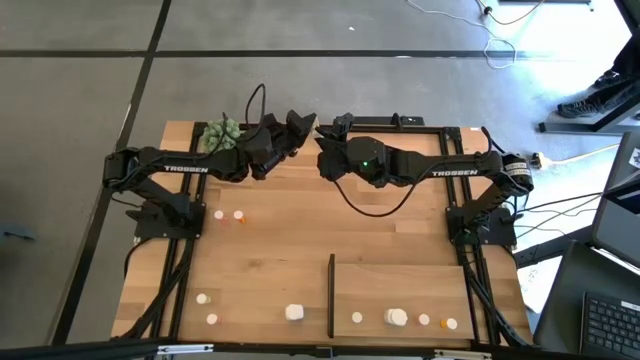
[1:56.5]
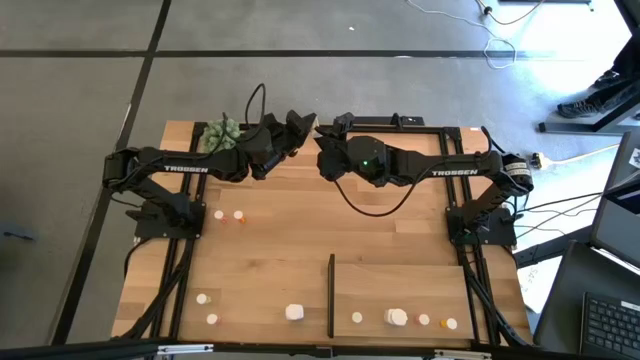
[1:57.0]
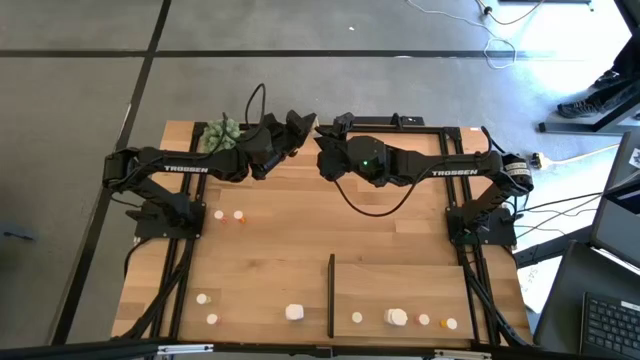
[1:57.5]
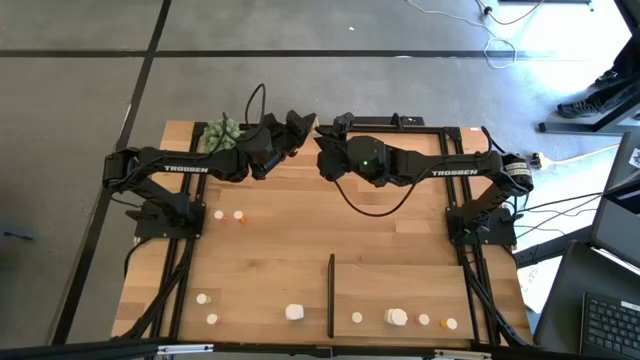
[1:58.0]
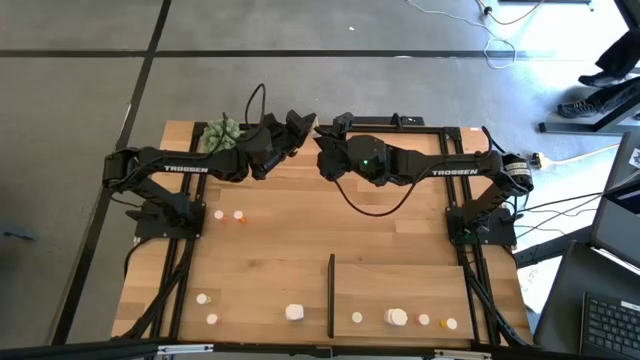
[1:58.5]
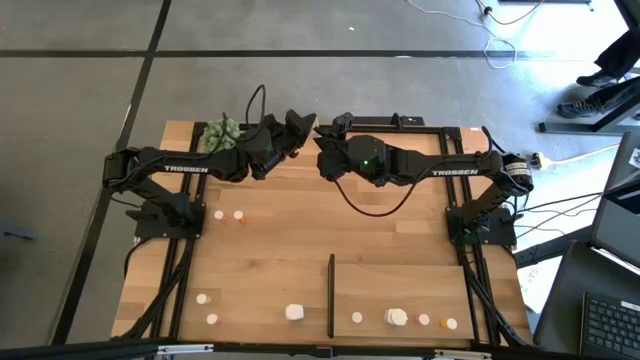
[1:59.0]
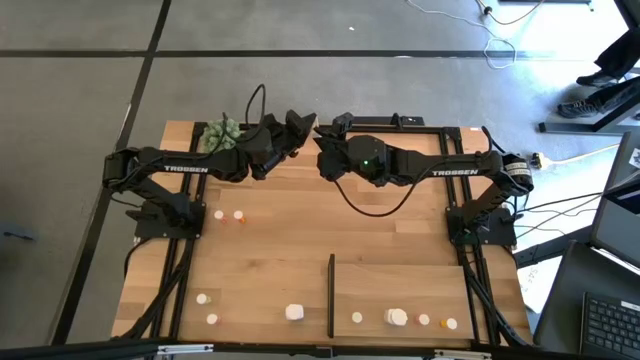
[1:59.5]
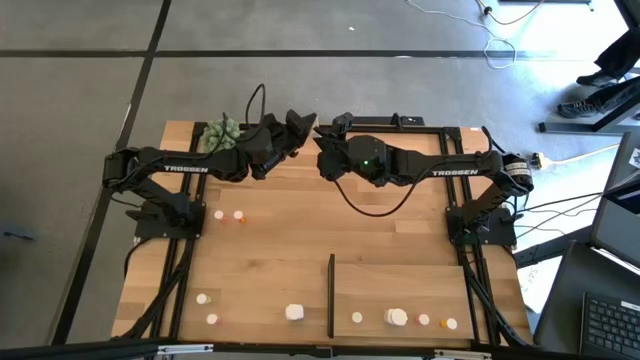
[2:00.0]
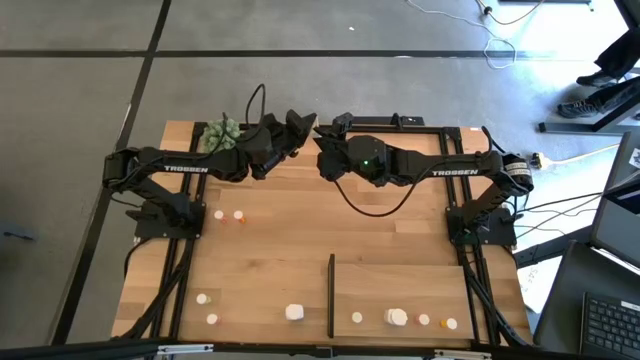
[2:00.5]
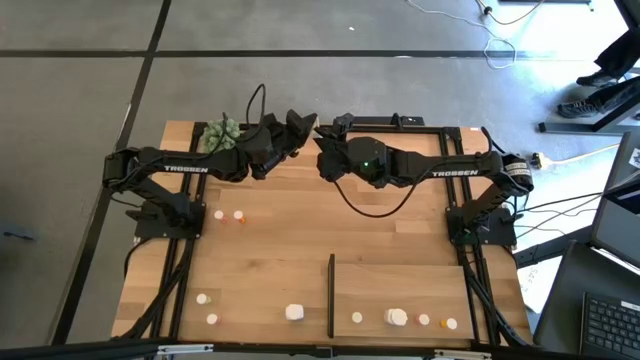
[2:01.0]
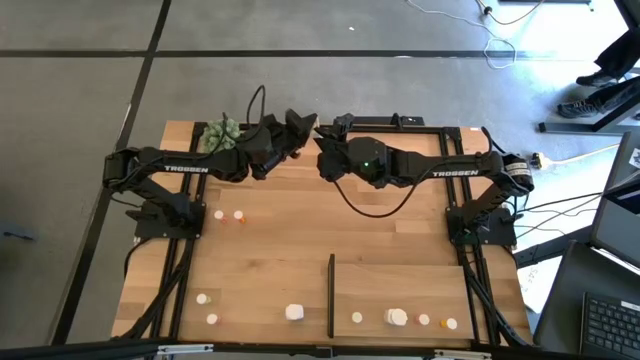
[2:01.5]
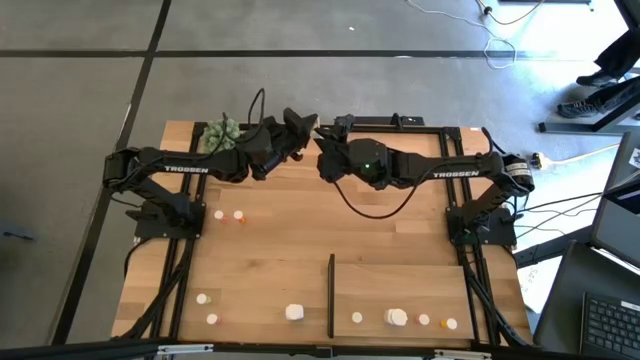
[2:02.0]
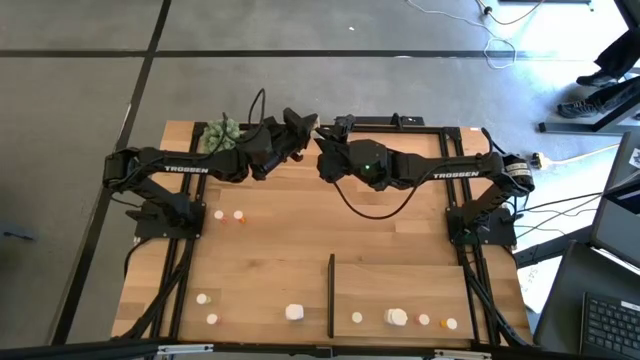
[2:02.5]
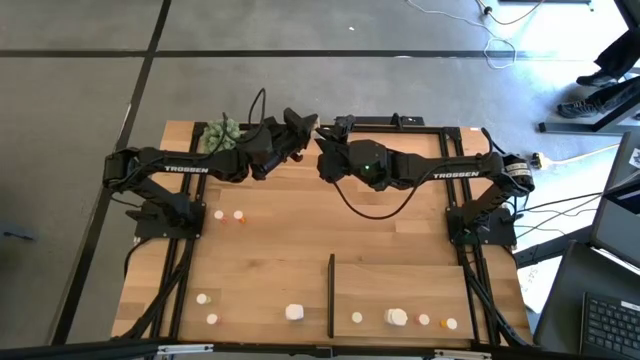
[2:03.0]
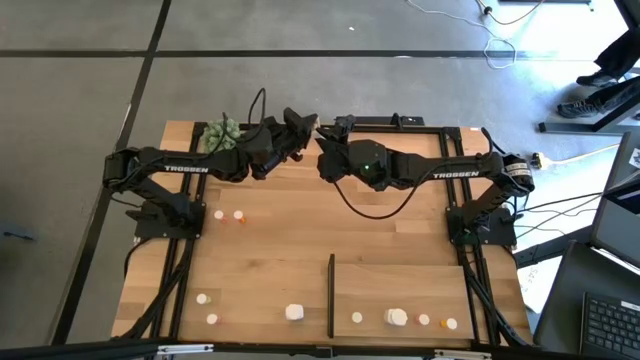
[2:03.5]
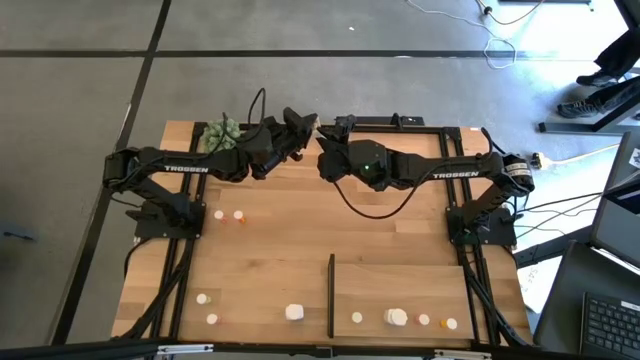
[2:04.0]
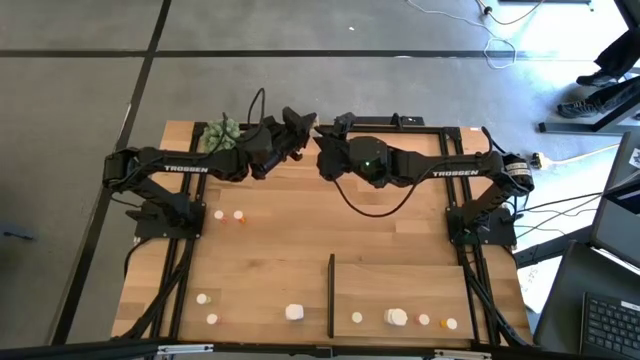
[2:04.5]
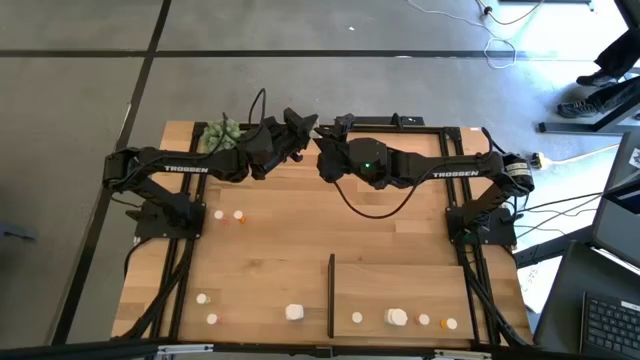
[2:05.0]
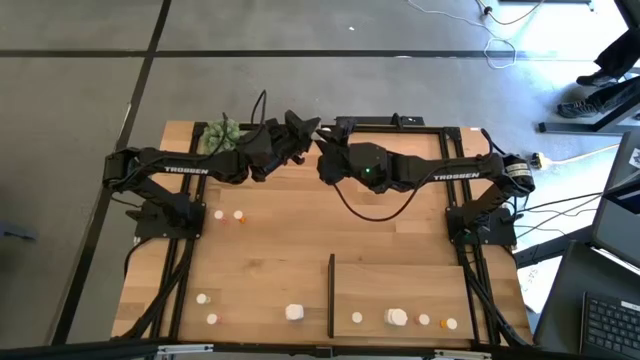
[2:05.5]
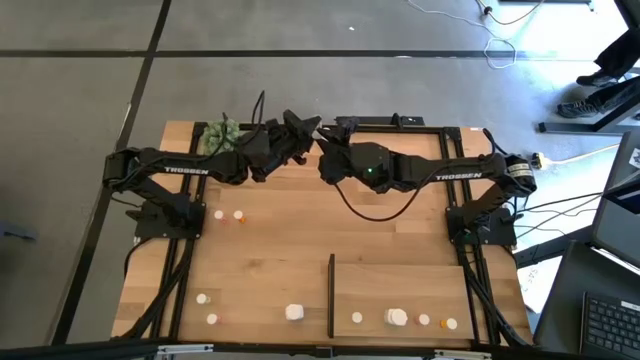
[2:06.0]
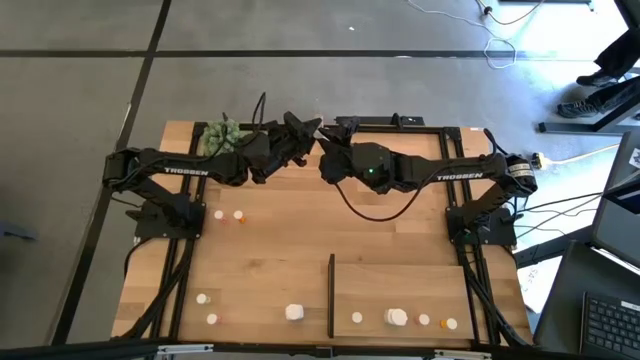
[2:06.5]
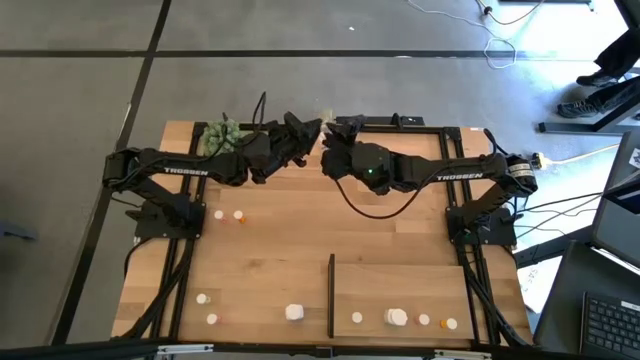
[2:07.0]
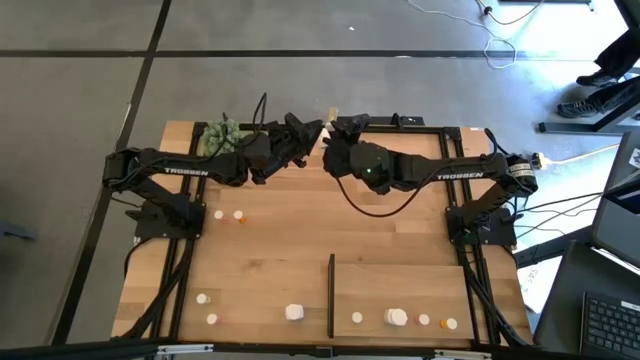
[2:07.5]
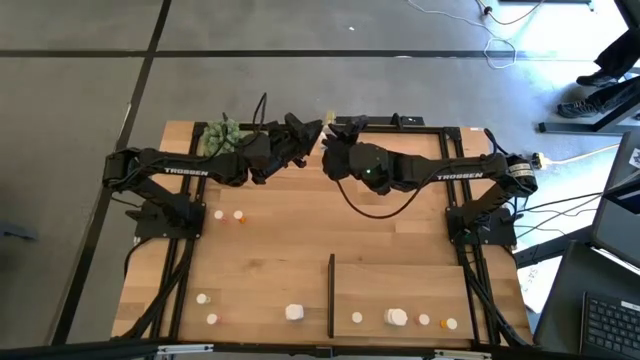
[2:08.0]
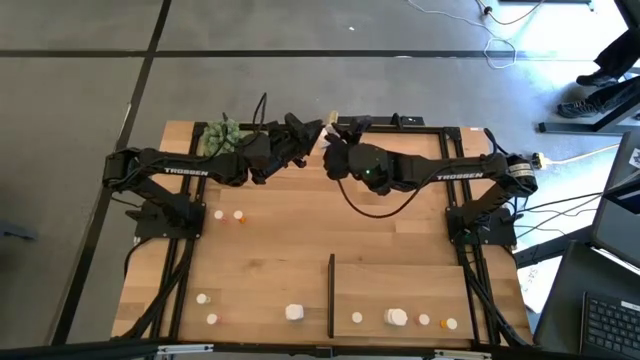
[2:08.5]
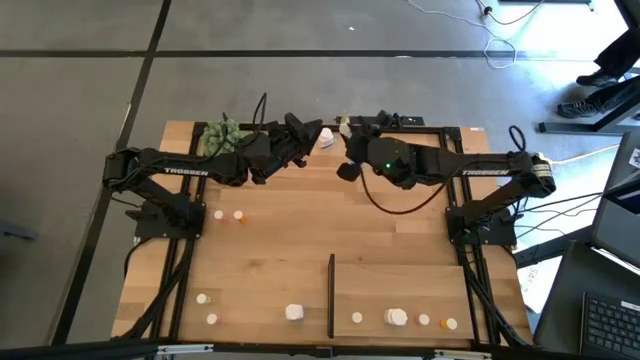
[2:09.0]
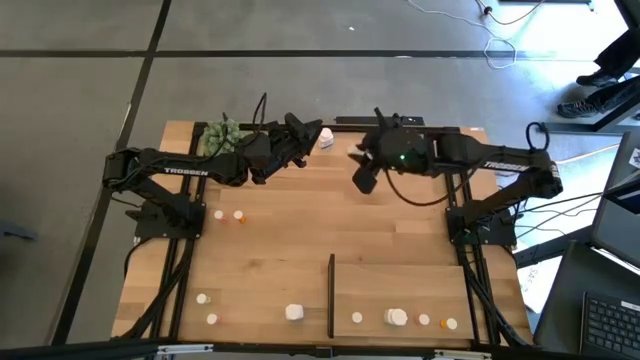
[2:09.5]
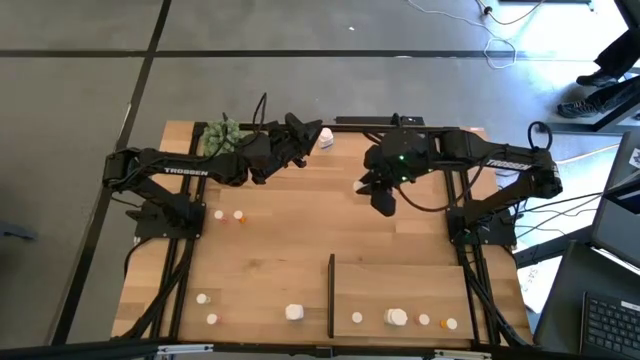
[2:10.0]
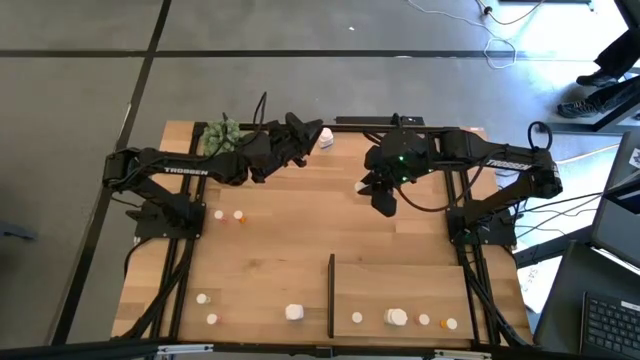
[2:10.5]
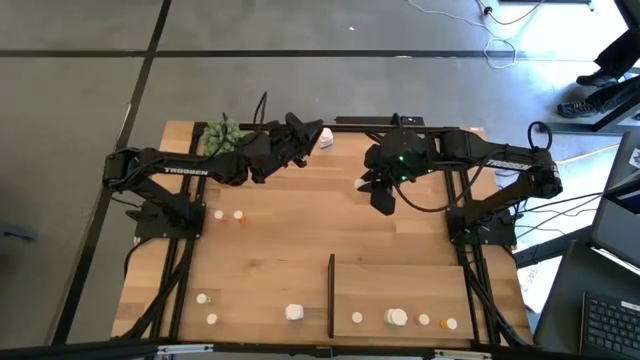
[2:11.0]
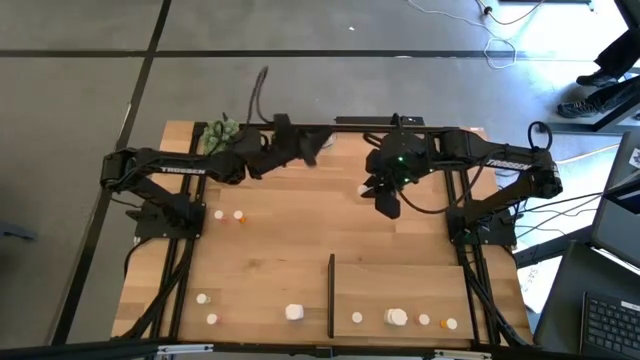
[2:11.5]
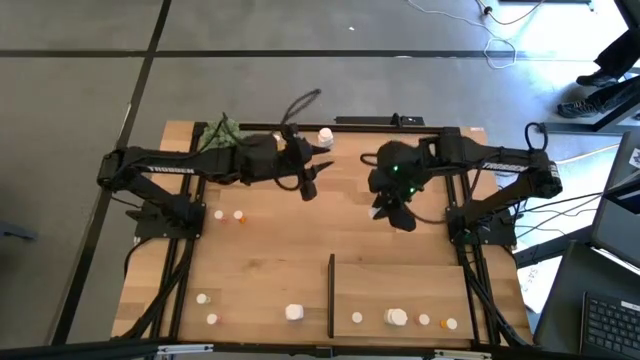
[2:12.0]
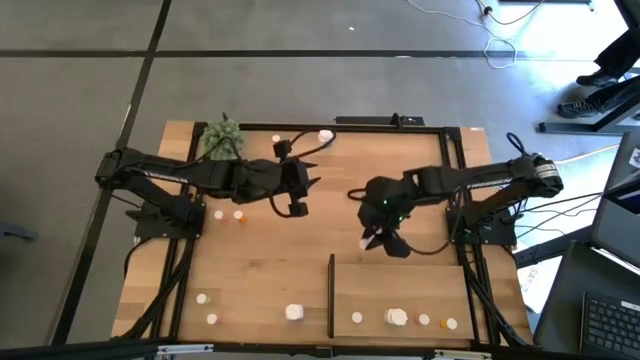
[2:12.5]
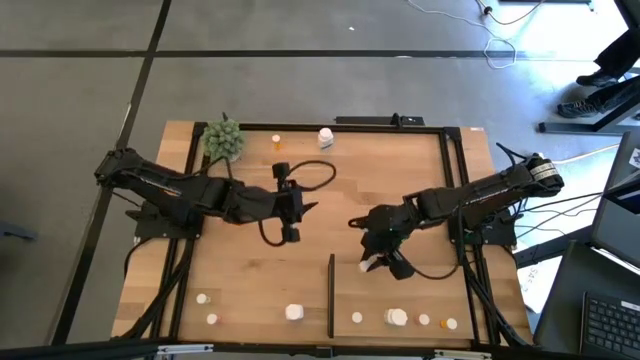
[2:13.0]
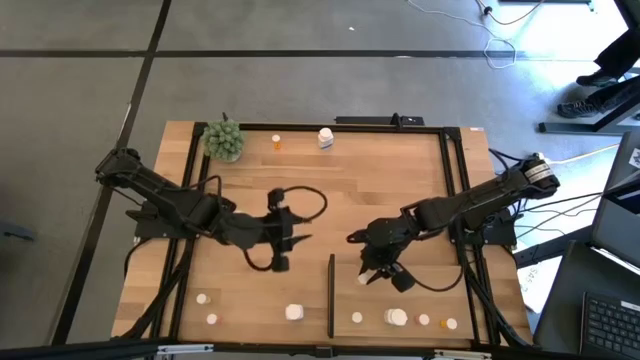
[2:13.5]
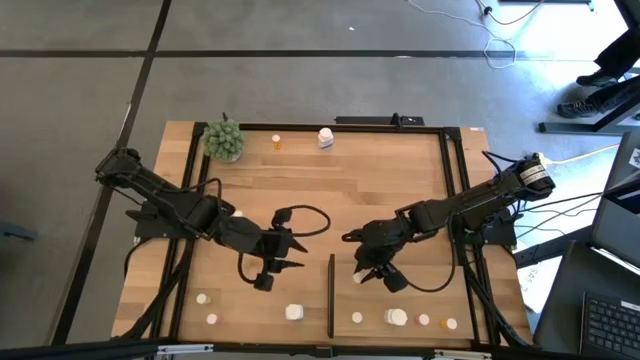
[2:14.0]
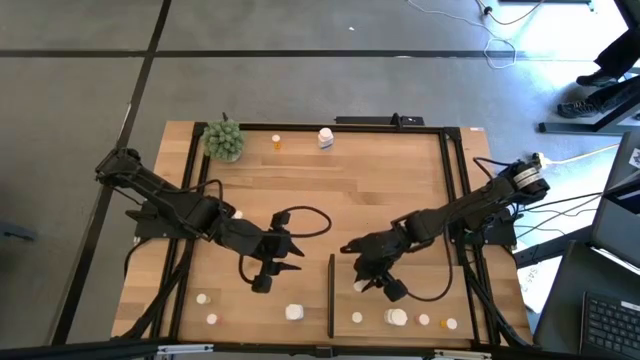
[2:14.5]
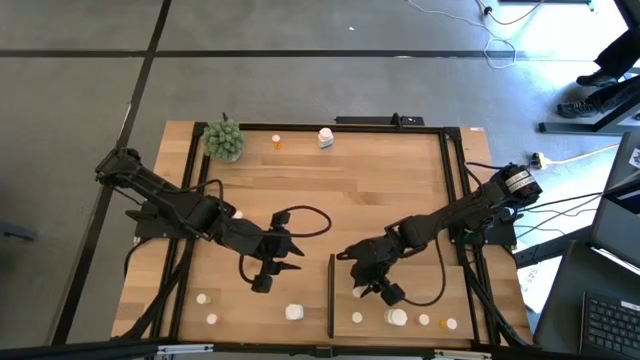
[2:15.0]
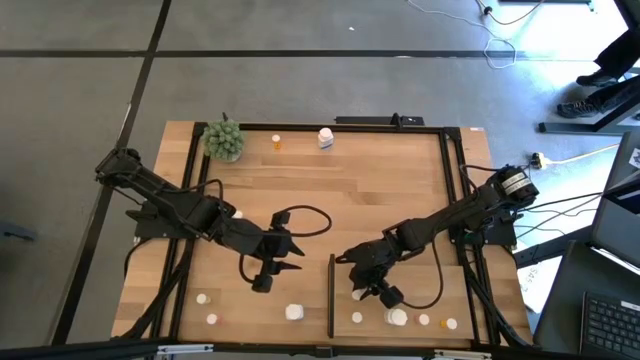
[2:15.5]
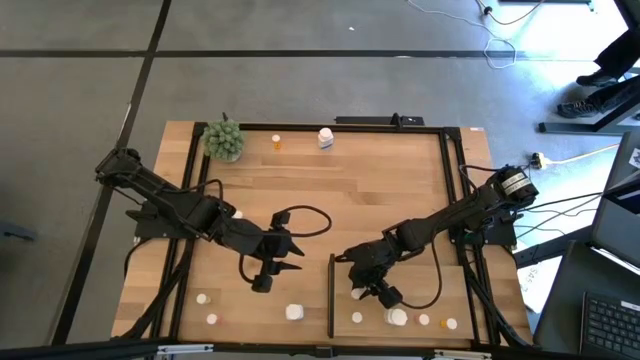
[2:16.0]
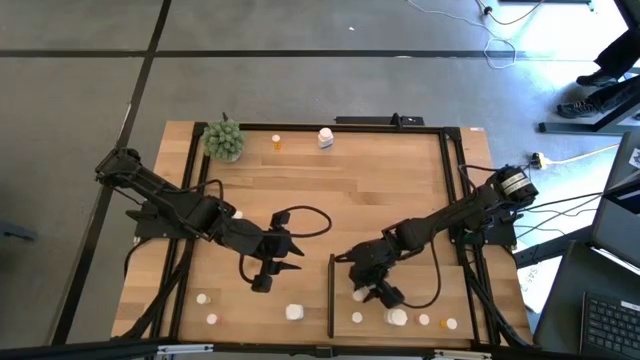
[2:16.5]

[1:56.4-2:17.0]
Task: Pick and place medicine bottles onto shelf by color
Put the top yellow pill bottle on the shelf aligned with the other yellow pill bottle

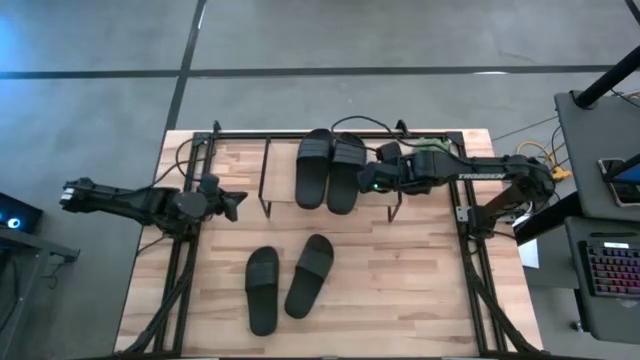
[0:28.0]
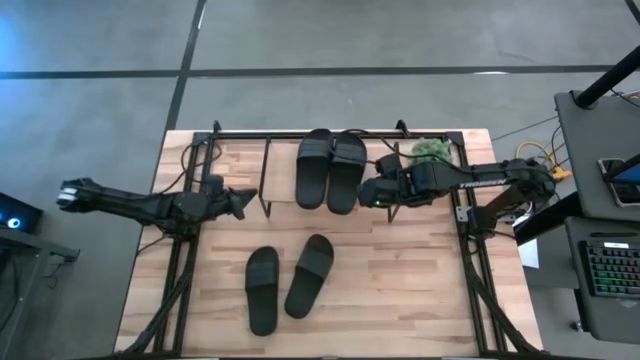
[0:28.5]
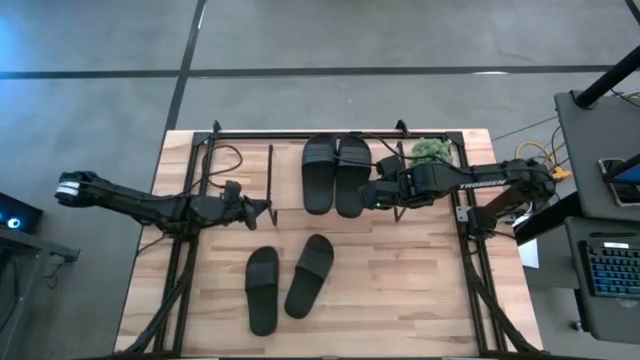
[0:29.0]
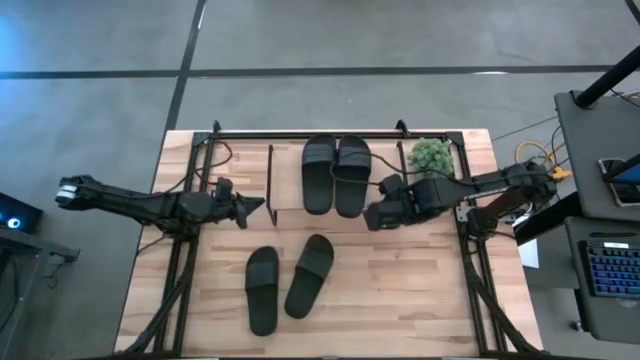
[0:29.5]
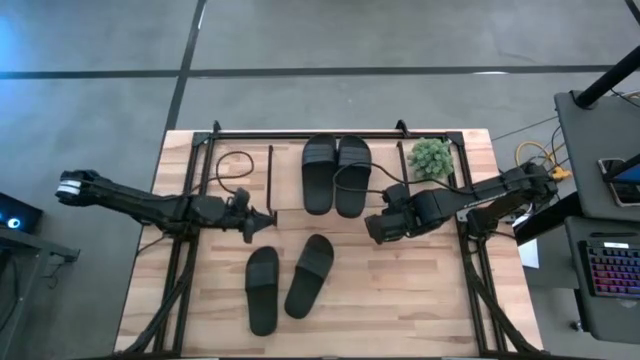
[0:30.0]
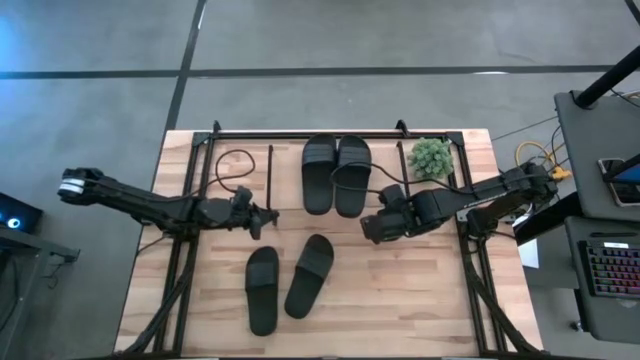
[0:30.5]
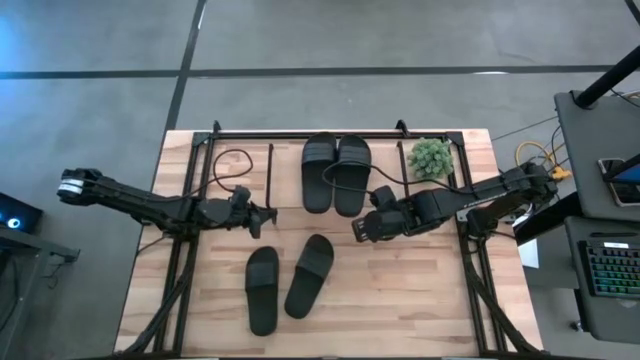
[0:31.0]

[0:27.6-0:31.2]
Task: Pick and place slides into the shelf
Adjust the shelf
